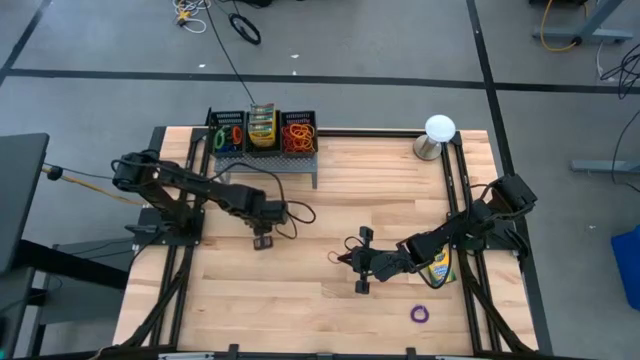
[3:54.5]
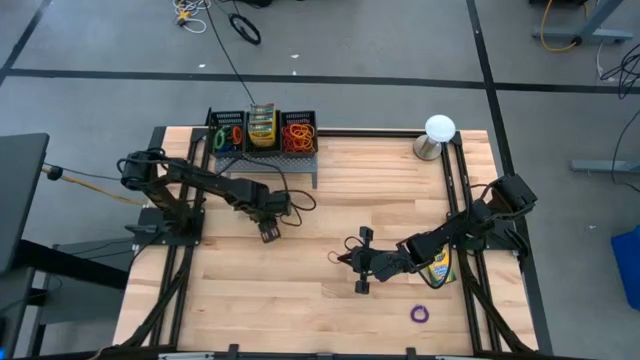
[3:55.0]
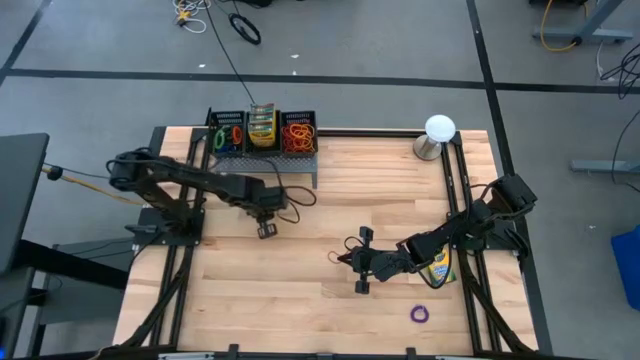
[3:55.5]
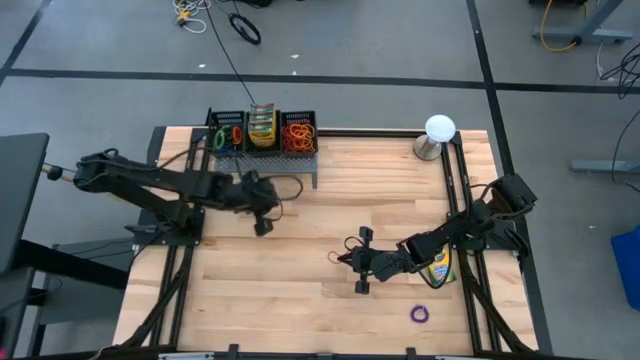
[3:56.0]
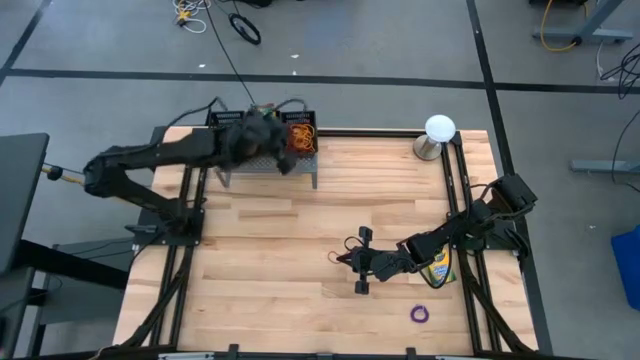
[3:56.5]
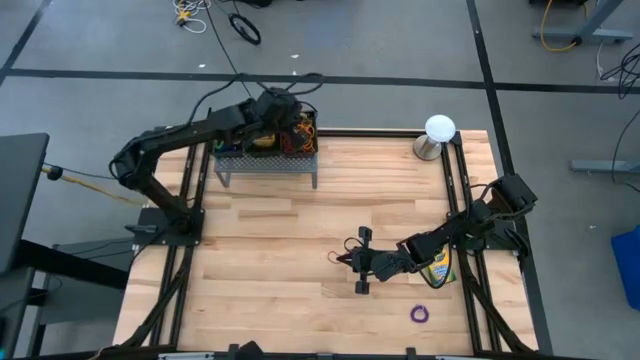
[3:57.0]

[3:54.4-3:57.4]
Task: Pick & Place Office Desk Supplies
Put the yellow rubber band into the right black bin

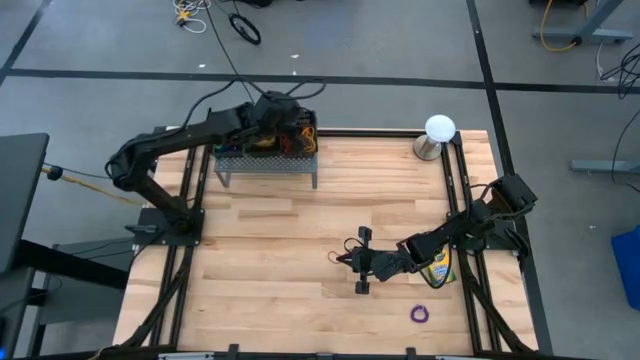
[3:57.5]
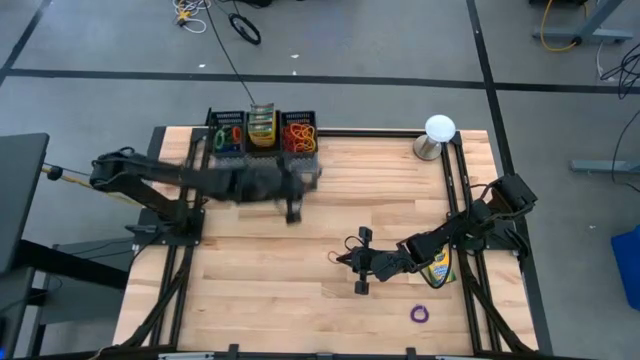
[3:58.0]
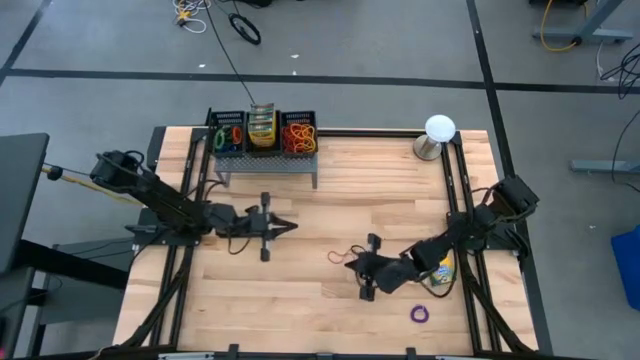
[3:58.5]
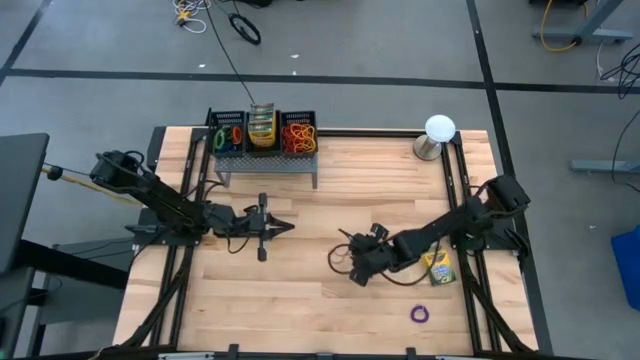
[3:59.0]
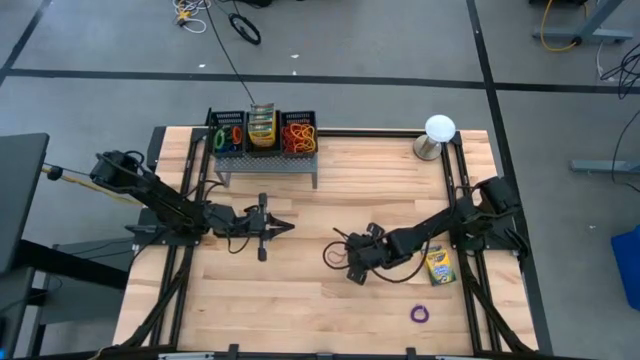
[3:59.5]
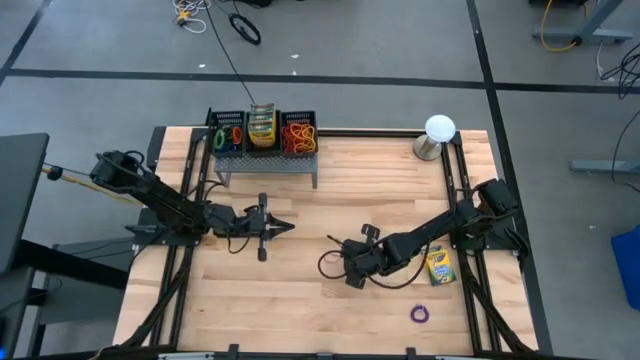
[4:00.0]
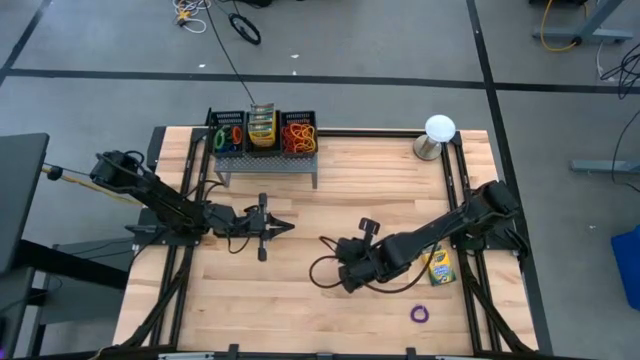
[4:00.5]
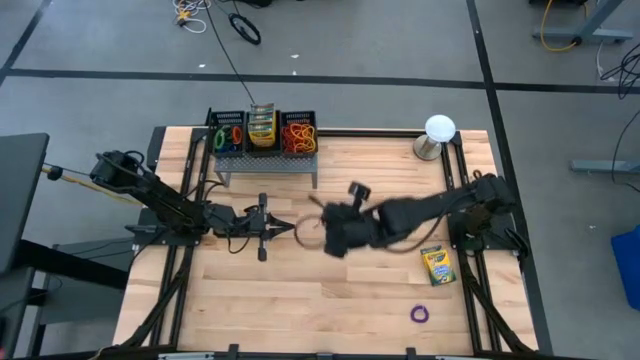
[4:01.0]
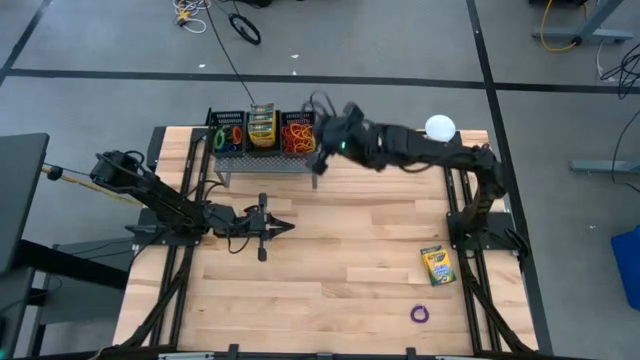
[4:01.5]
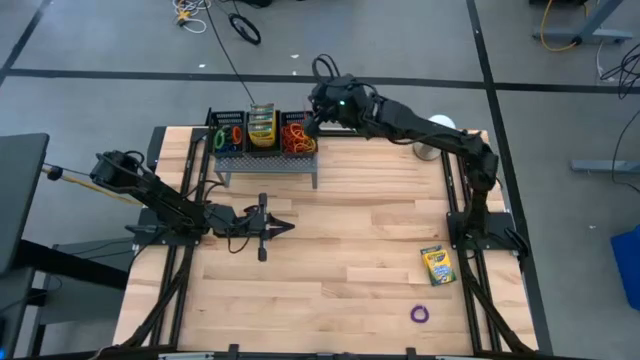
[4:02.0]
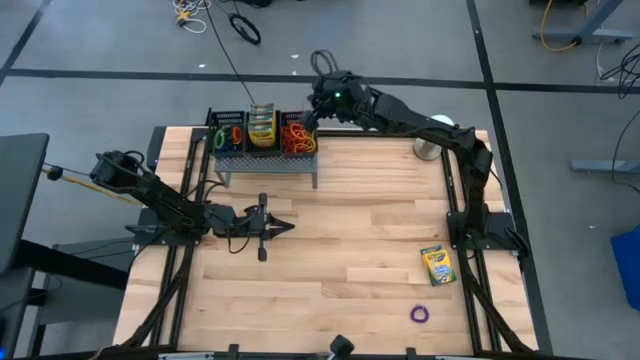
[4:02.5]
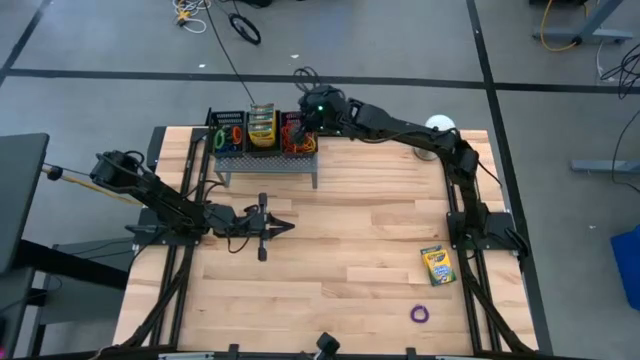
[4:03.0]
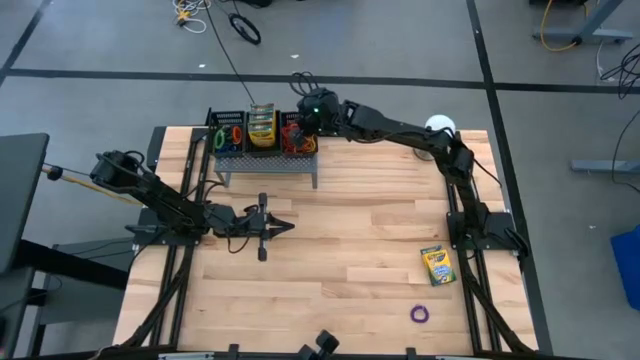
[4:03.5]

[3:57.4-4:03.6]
Put the red rubber band into the right black bin

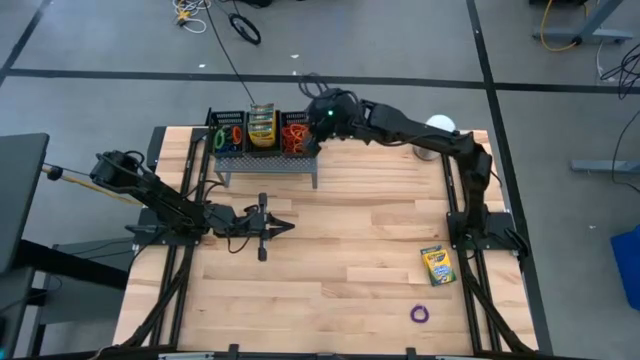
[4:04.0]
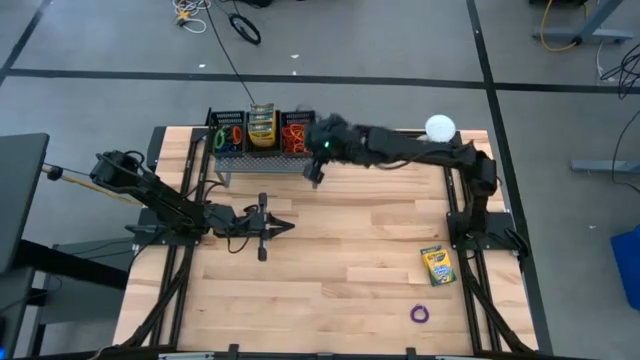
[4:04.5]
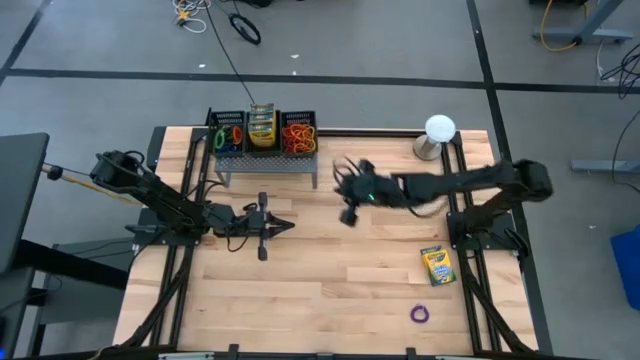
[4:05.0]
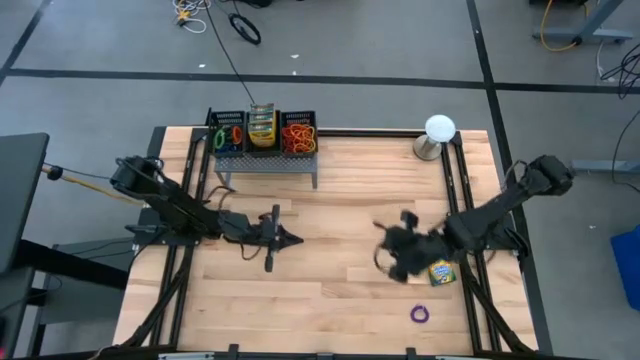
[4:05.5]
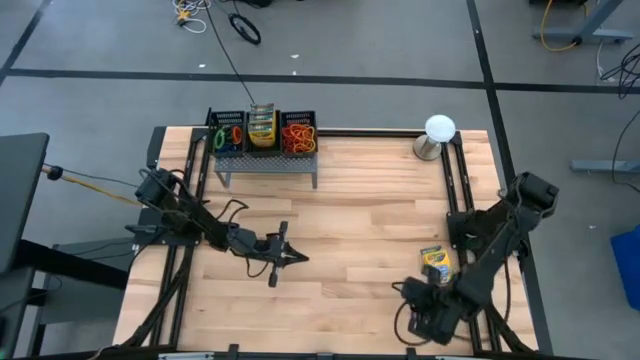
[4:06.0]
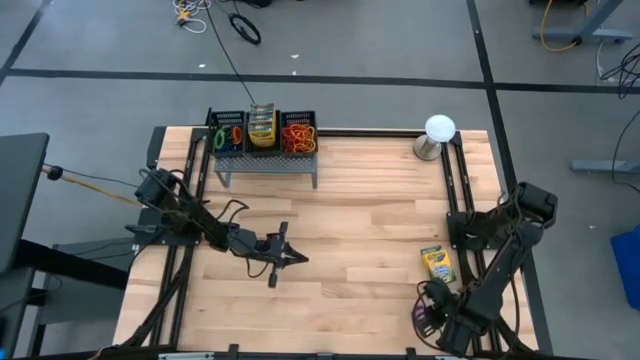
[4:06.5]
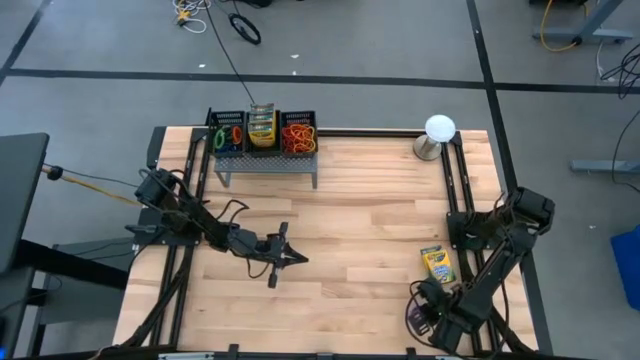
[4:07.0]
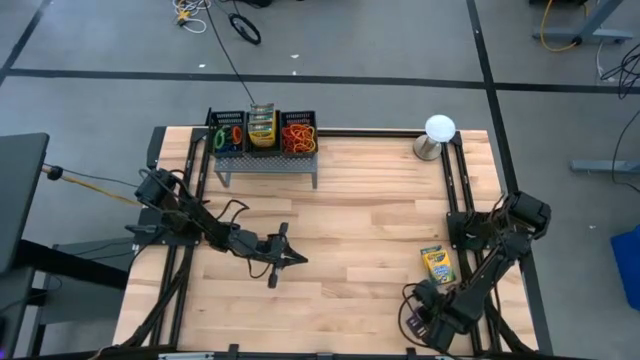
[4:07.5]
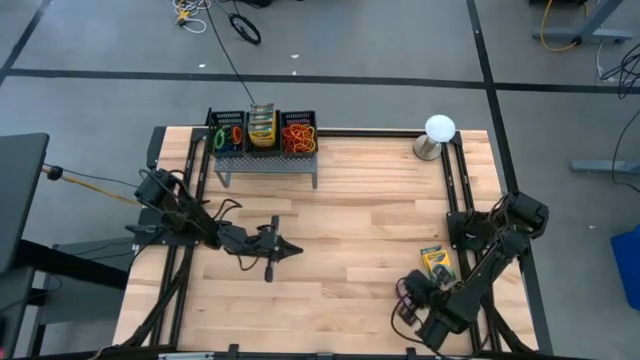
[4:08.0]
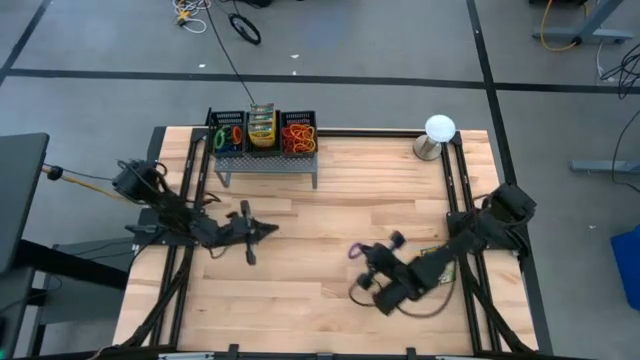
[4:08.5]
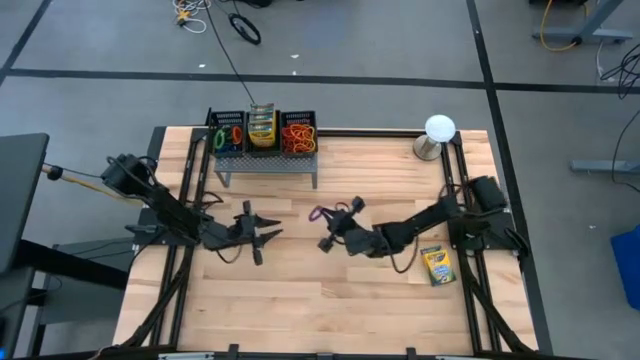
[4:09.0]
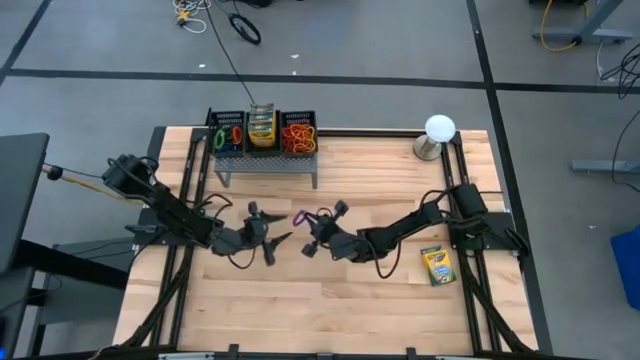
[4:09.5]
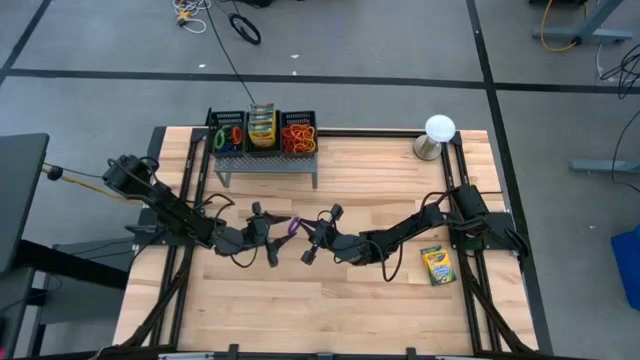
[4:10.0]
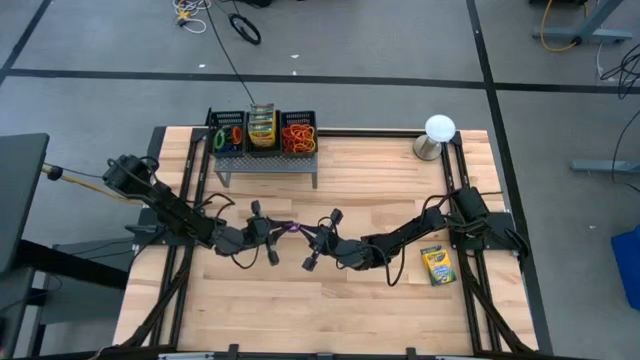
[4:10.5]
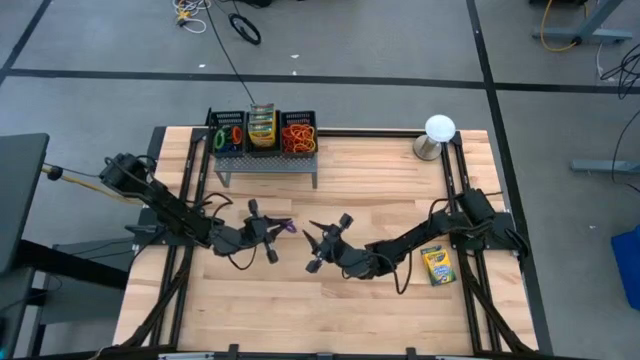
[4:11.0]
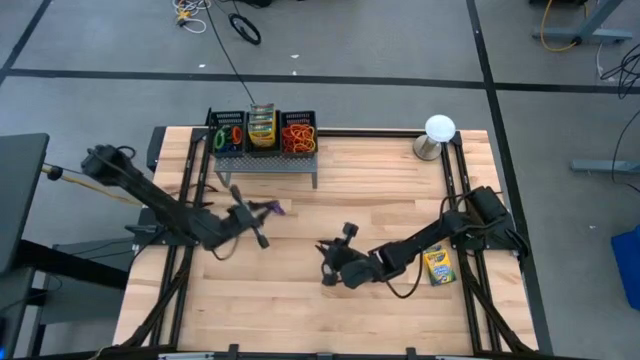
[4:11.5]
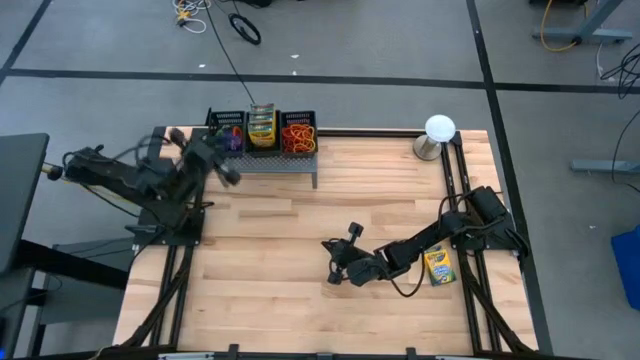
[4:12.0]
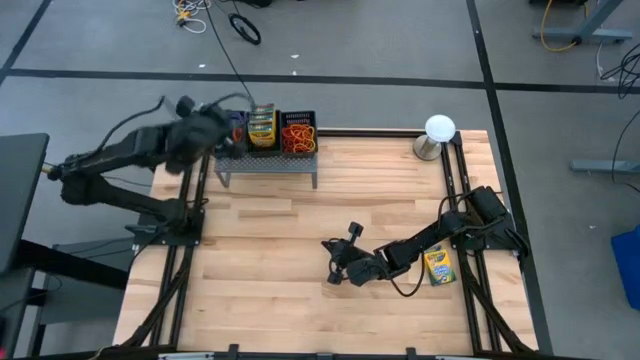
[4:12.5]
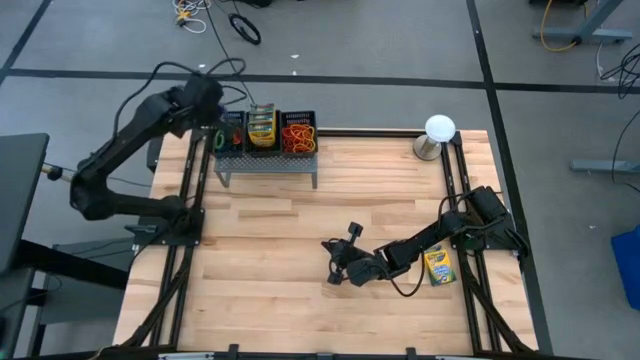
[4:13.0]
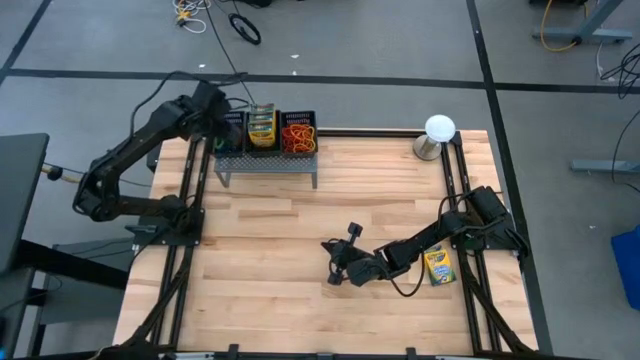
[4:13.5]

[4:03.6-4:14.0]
Put the violet spiral keychain into the left bin
